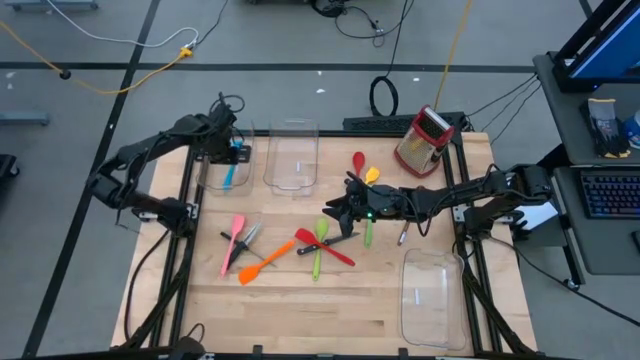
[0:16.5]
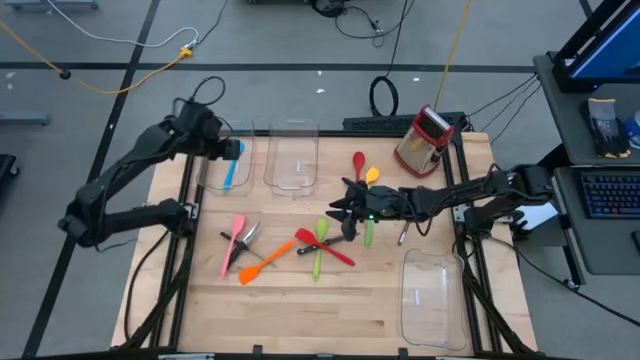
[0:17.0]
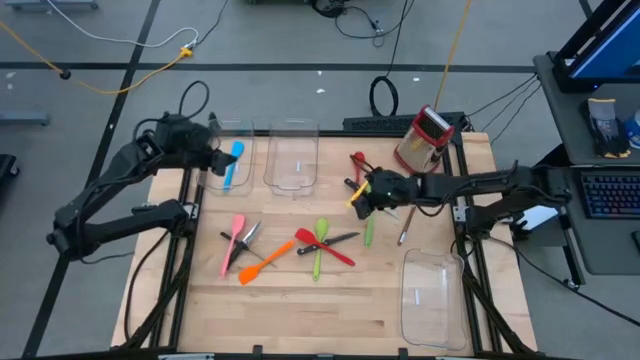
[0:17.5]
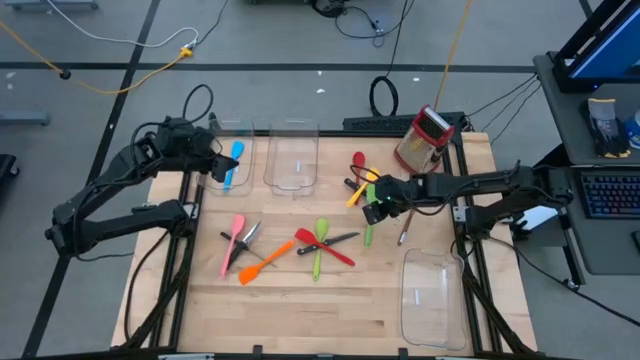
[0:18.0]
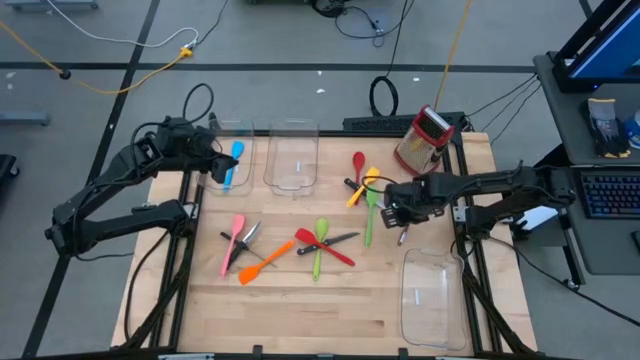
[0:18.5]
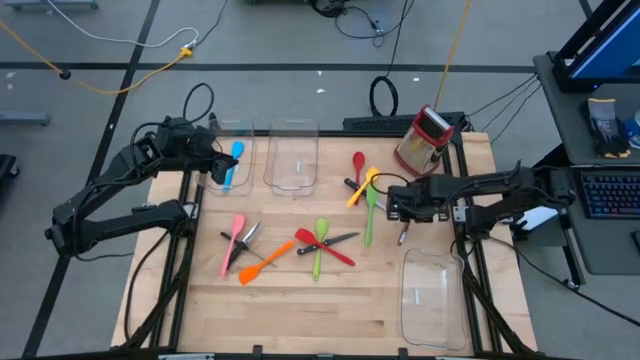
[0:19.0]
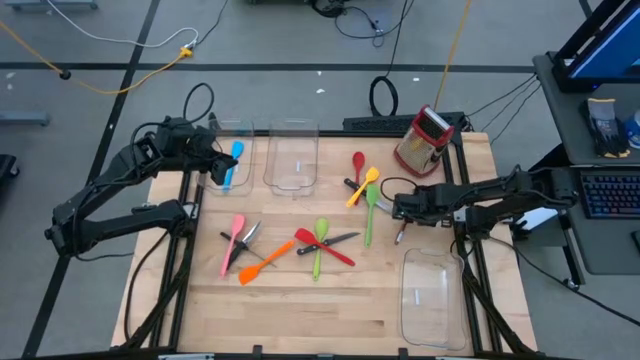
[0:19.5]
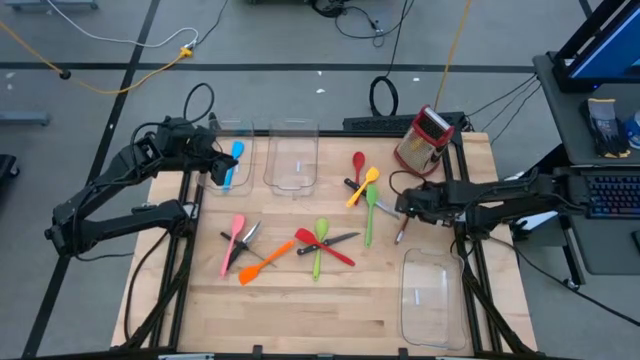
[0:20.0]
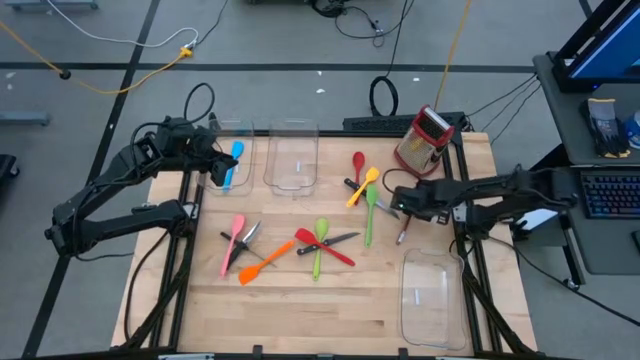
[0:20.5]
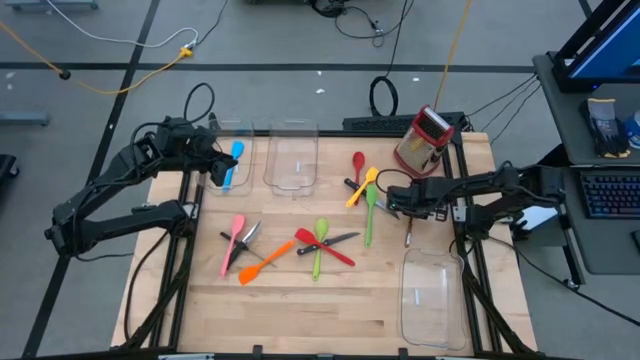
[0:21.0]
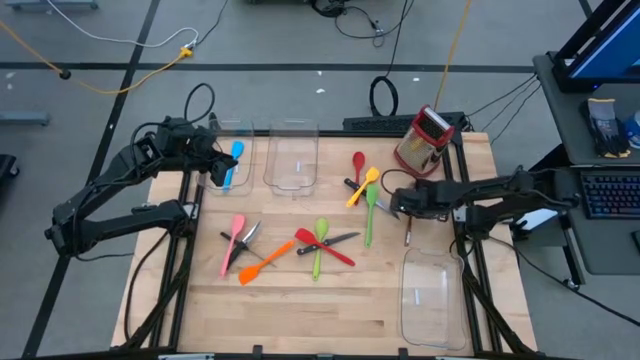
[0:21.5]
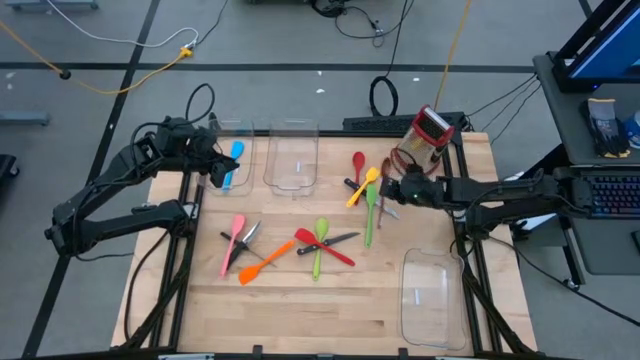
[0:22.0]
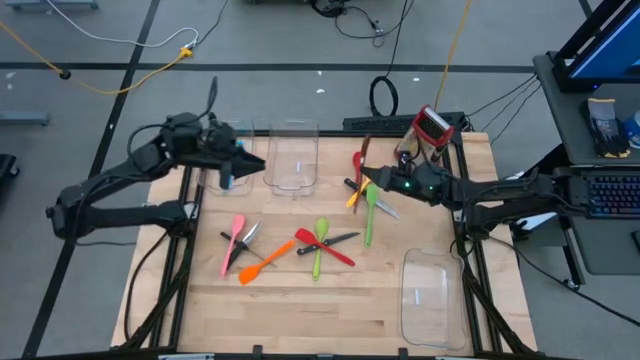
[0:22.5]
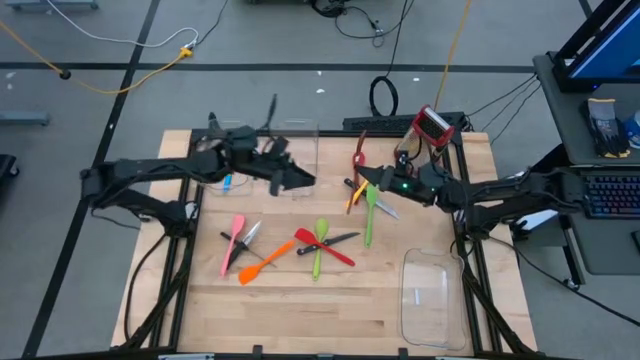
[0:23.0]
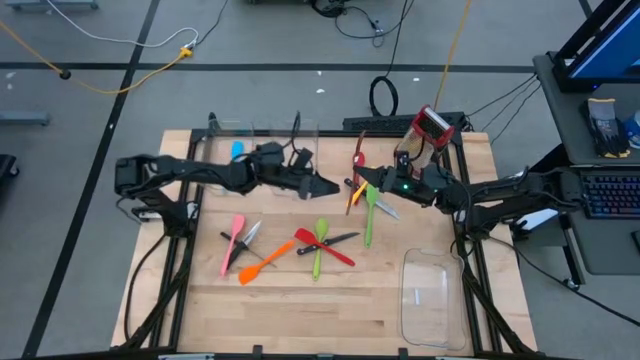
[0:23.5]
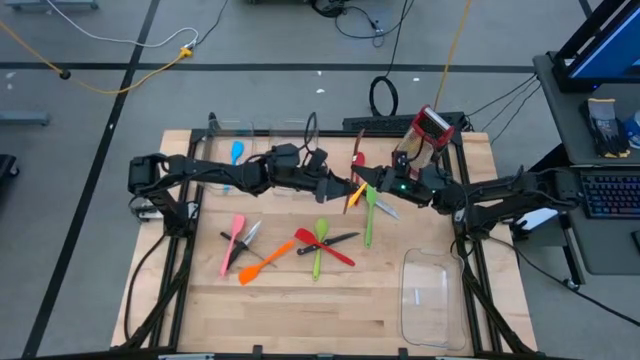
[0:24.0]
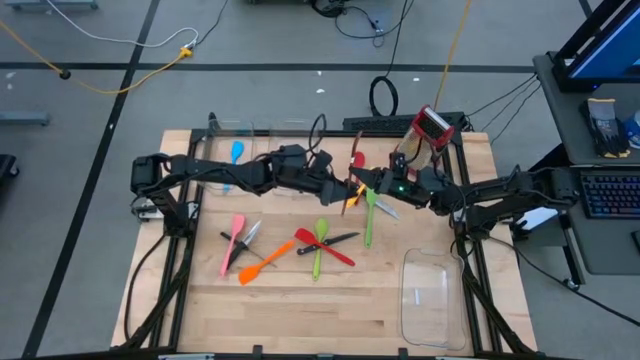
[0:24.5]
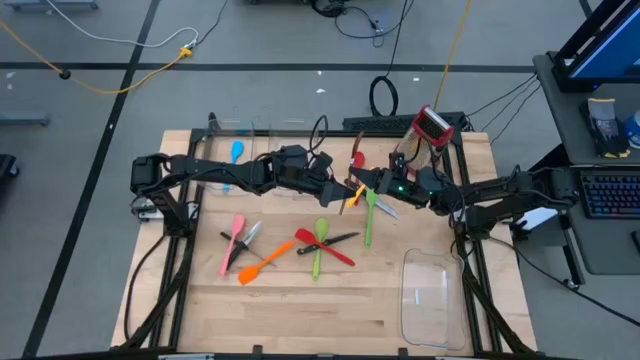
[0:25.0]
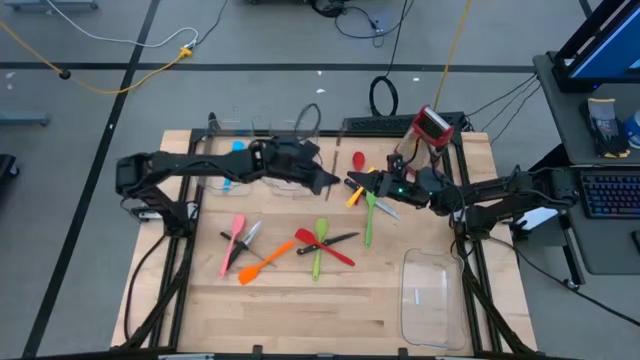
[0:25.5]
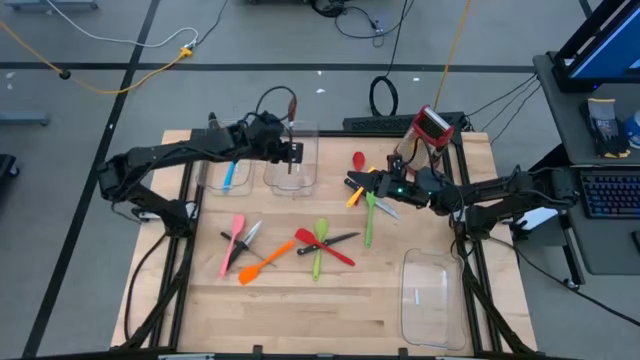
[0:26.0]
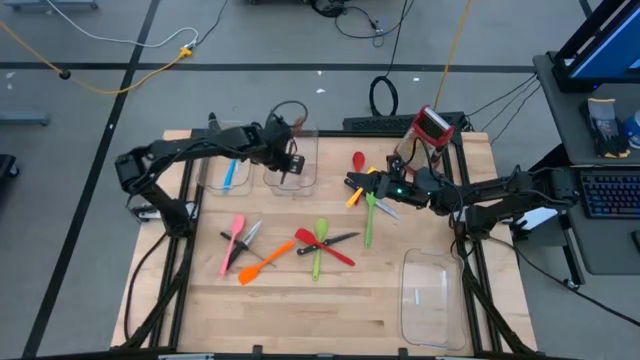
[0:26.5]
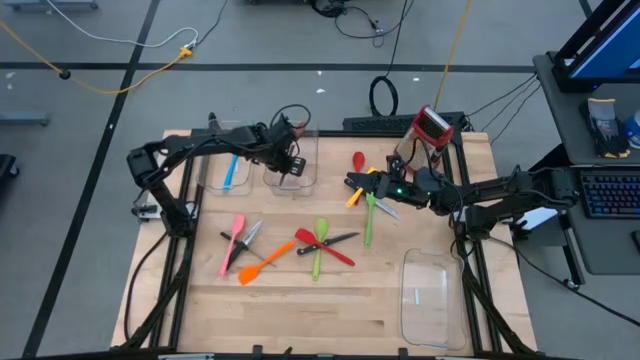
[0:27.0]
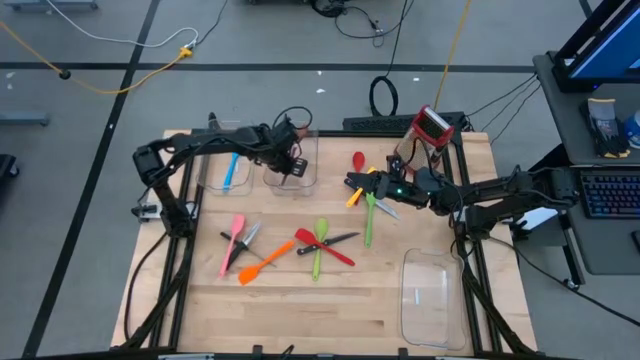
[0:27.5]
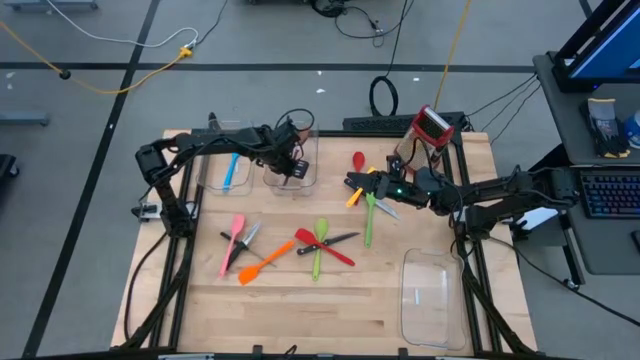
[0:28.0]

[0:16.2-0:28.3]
Task: Pick & Place Kitchen Items
Put the brown serving spoon into the right transparent bin

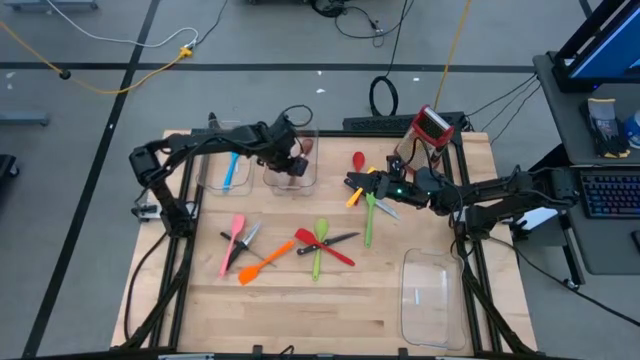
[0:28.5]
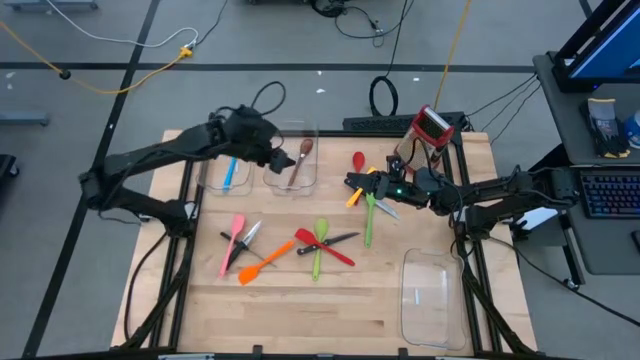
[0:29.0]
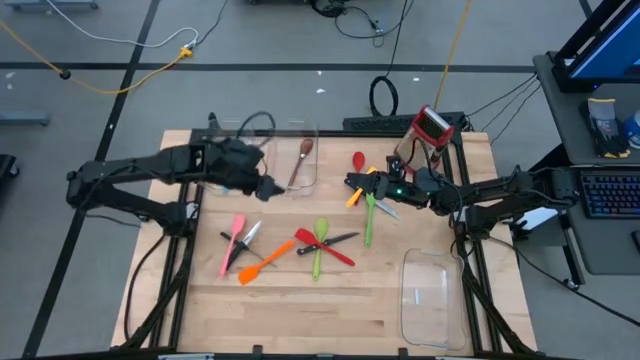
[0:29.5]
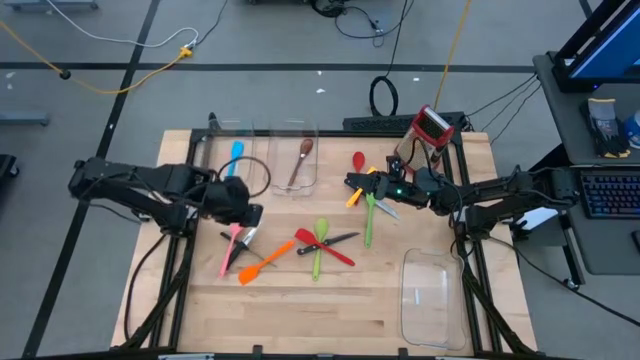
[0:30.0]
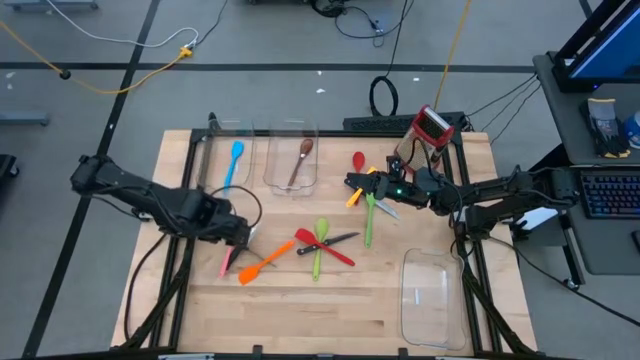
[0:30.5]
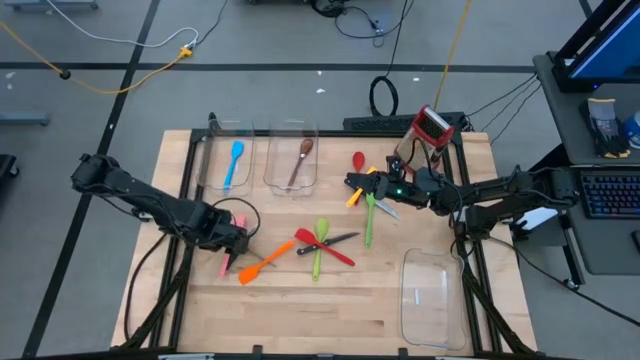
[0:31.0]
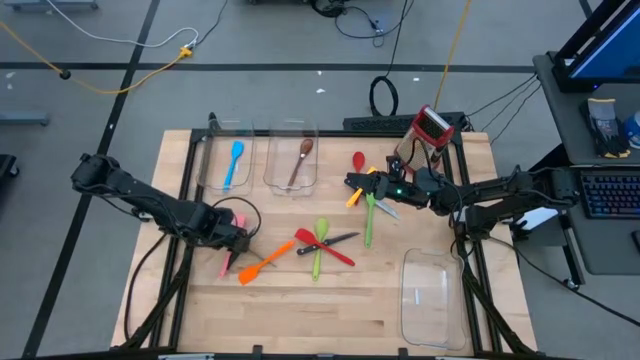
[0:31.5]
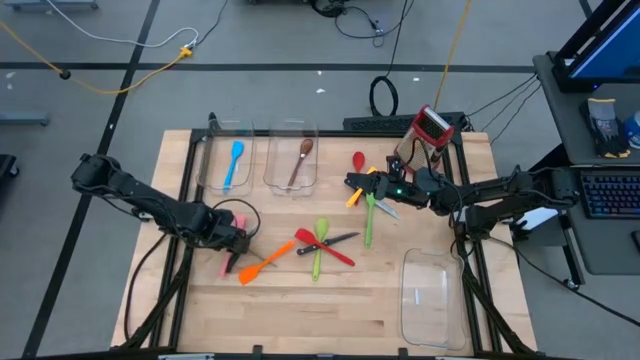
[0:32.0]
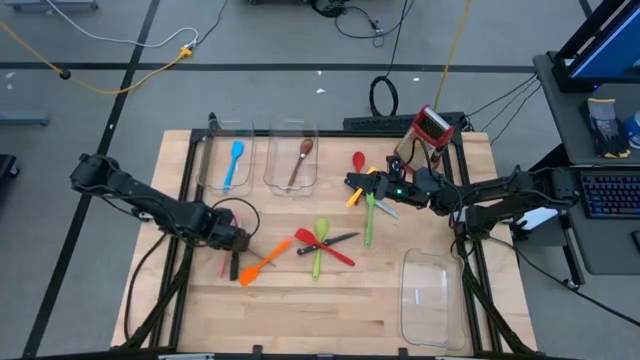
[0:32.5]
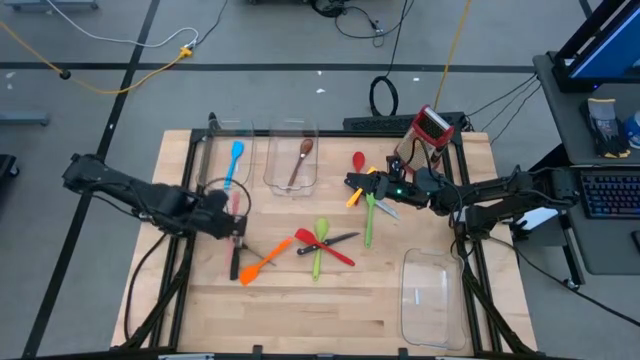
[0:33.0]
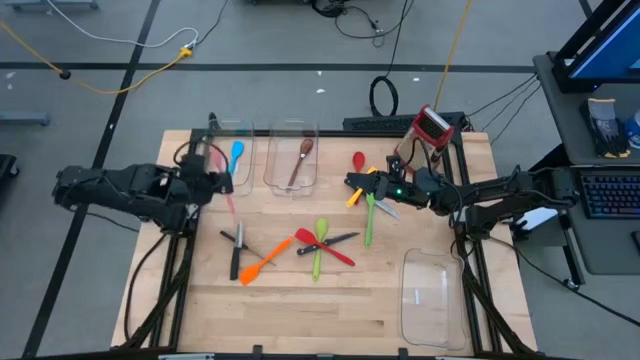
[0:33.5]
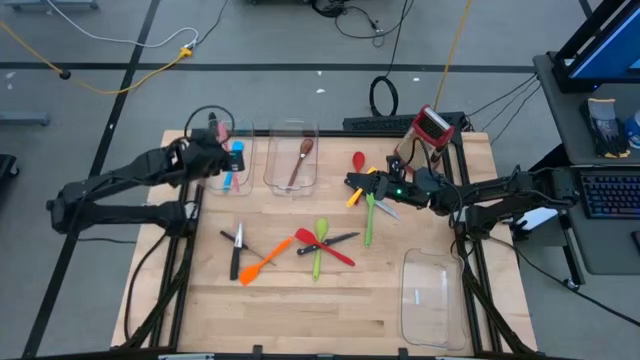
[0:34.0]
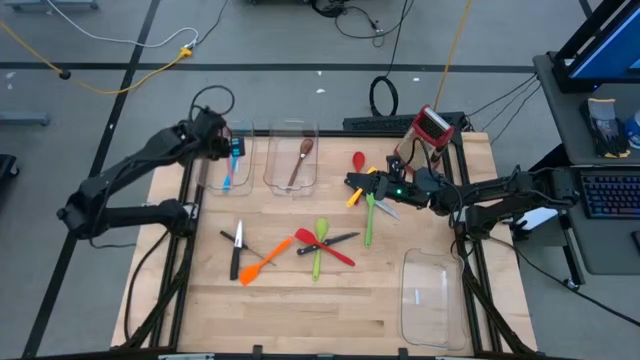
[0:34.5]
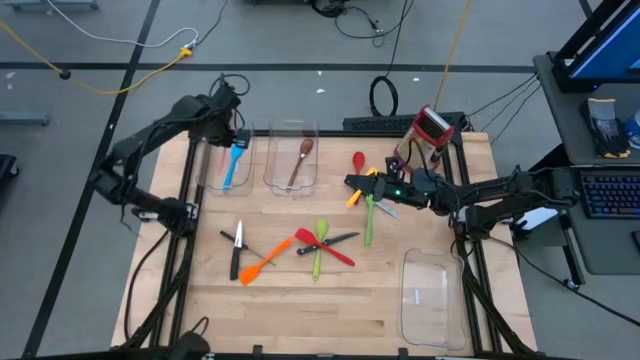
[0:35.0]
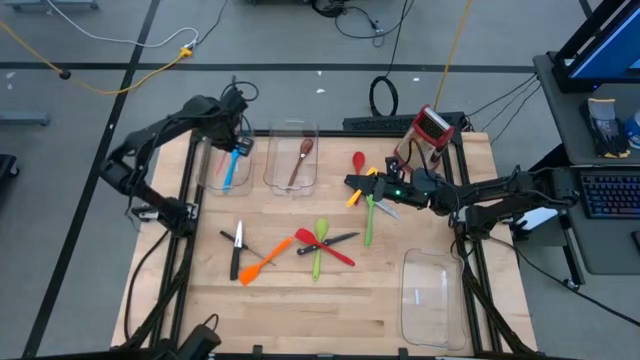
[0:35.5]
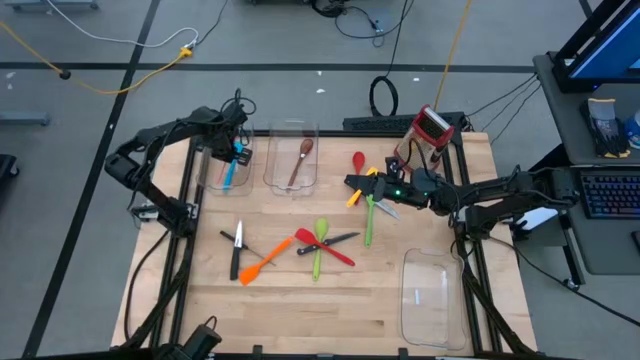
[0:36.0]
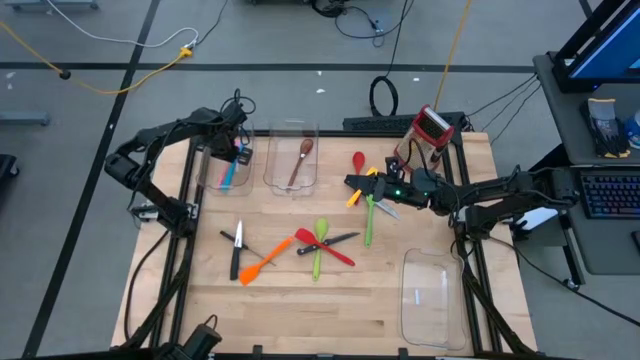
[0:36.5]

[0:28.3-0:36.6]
Put the pink spatula into the left transparent bin
